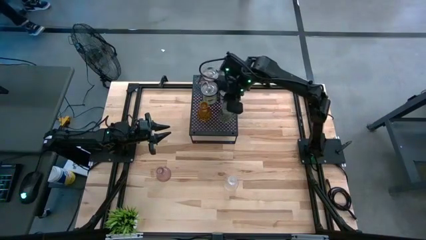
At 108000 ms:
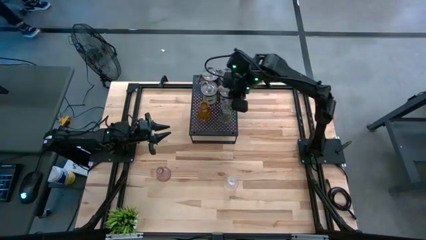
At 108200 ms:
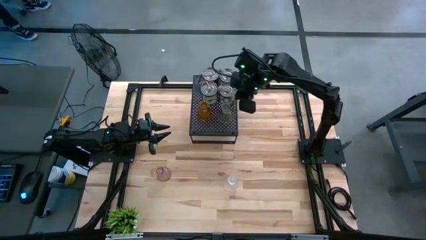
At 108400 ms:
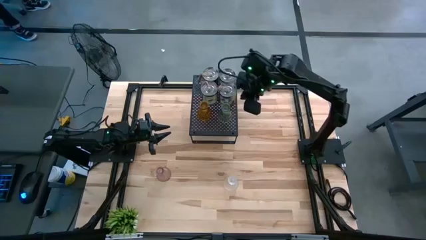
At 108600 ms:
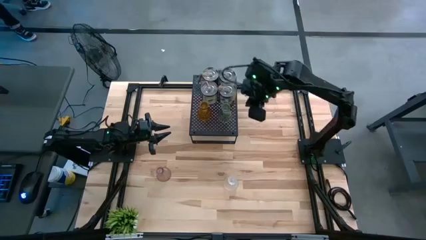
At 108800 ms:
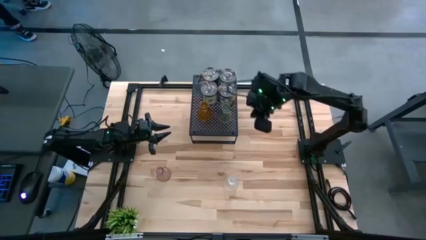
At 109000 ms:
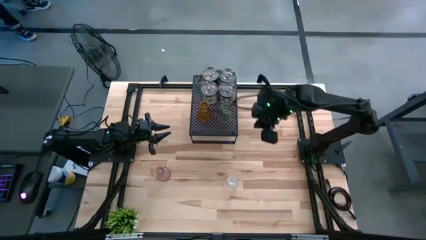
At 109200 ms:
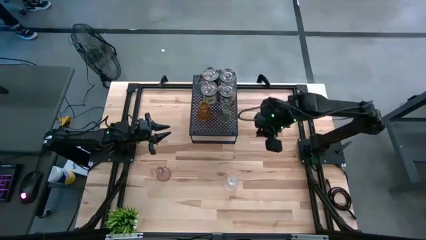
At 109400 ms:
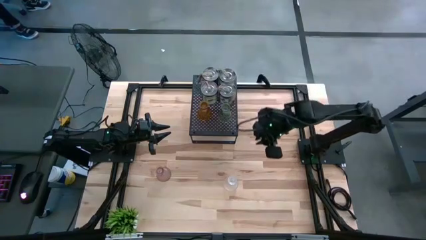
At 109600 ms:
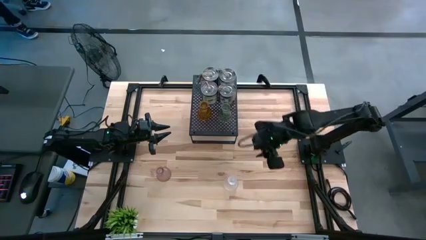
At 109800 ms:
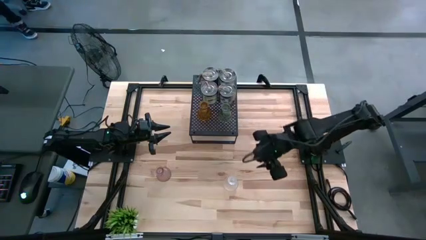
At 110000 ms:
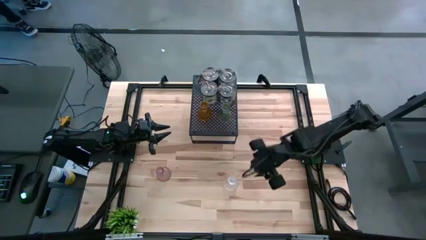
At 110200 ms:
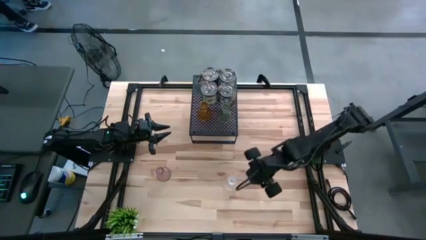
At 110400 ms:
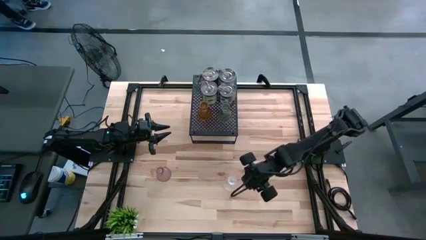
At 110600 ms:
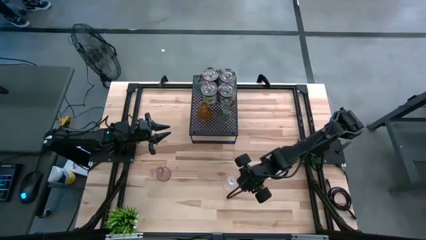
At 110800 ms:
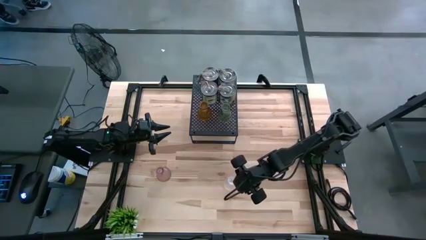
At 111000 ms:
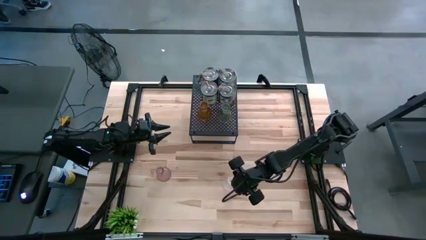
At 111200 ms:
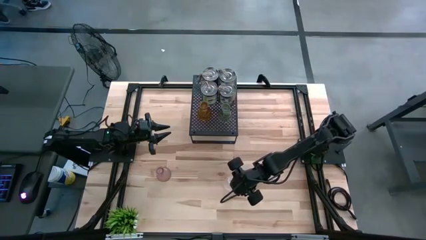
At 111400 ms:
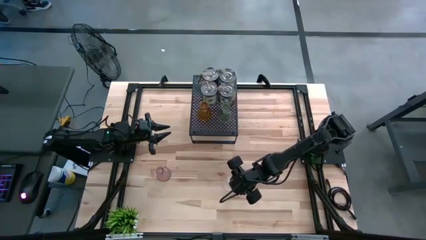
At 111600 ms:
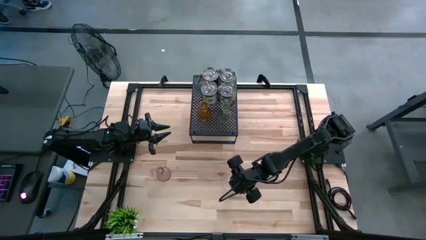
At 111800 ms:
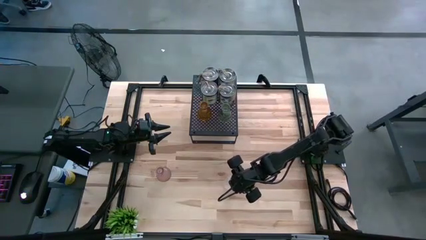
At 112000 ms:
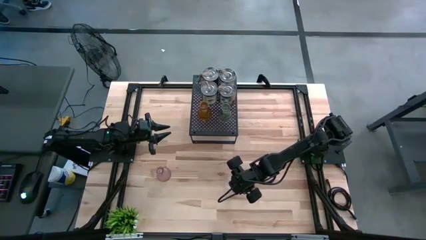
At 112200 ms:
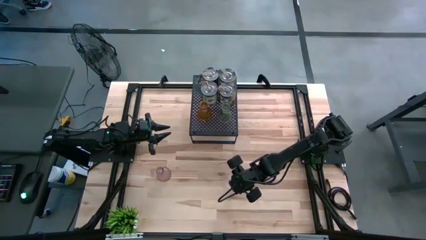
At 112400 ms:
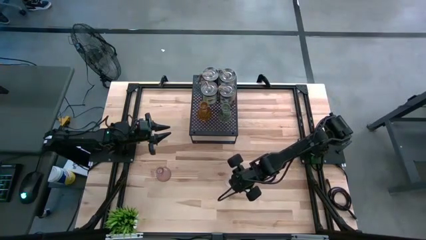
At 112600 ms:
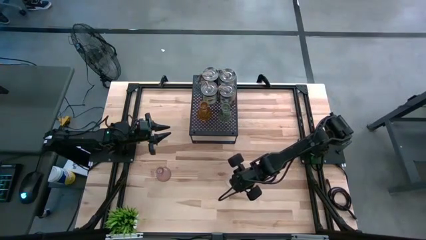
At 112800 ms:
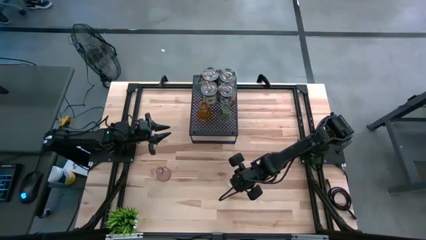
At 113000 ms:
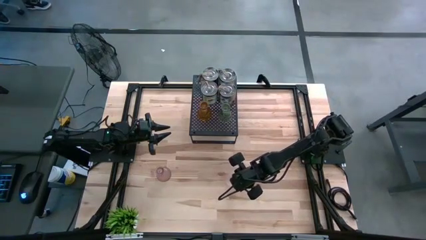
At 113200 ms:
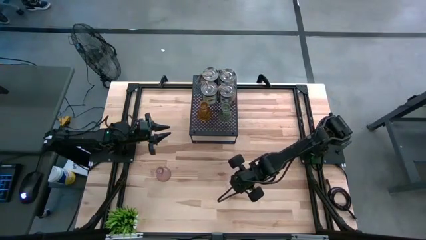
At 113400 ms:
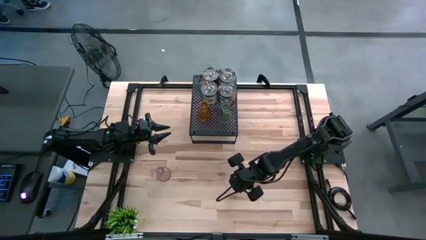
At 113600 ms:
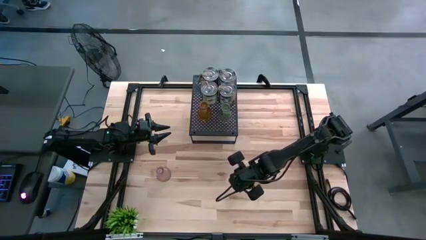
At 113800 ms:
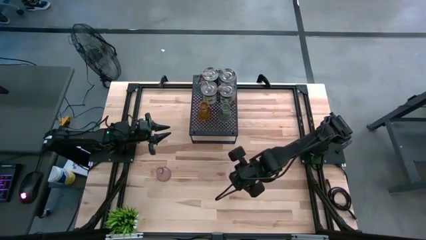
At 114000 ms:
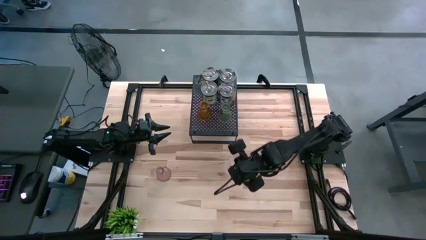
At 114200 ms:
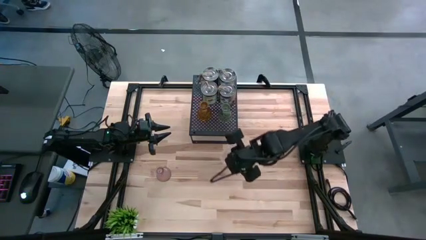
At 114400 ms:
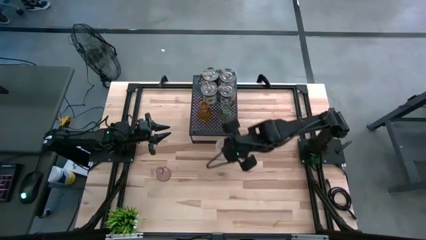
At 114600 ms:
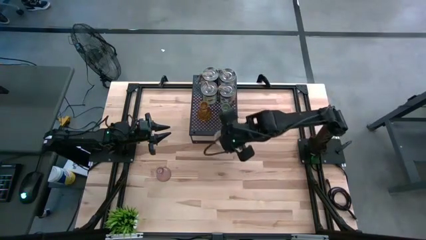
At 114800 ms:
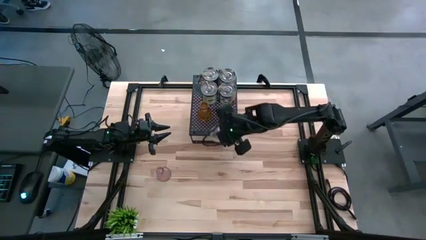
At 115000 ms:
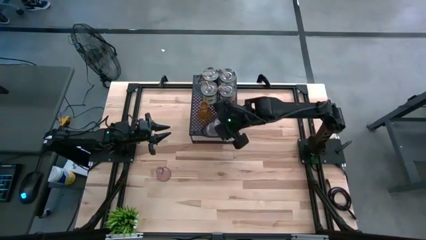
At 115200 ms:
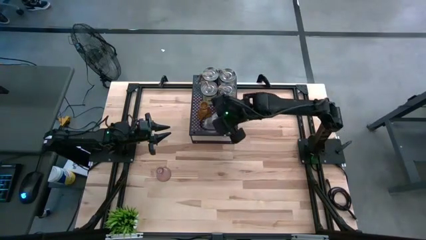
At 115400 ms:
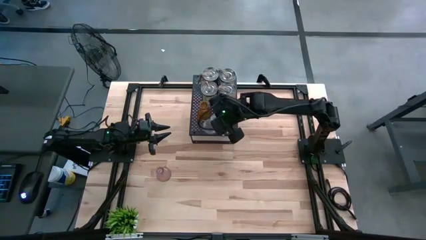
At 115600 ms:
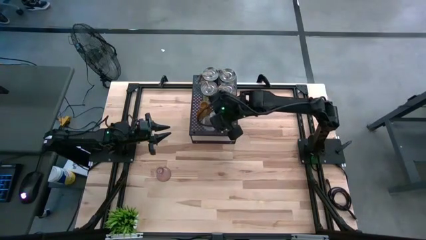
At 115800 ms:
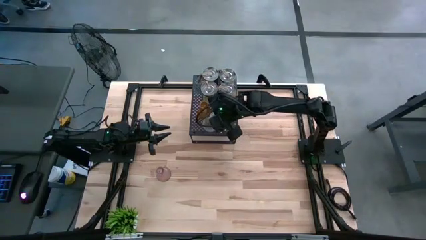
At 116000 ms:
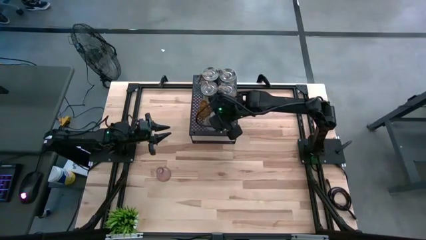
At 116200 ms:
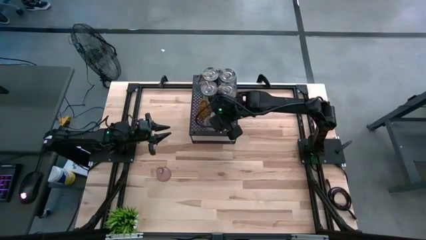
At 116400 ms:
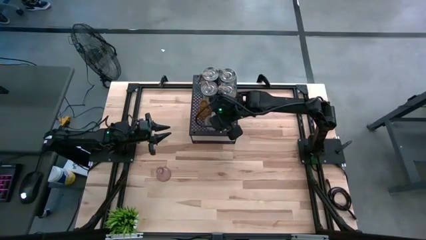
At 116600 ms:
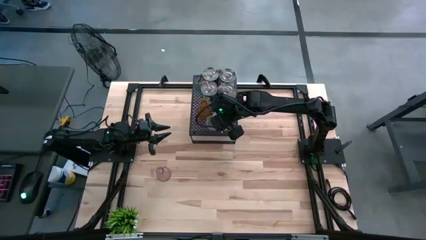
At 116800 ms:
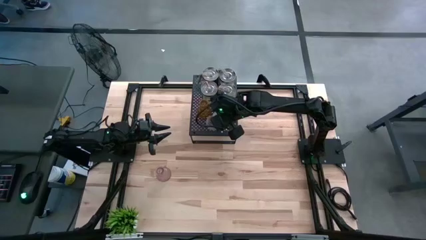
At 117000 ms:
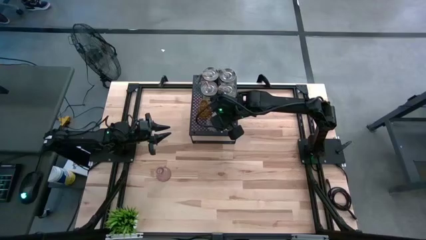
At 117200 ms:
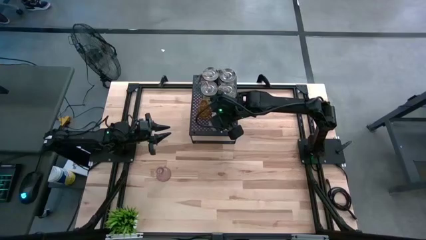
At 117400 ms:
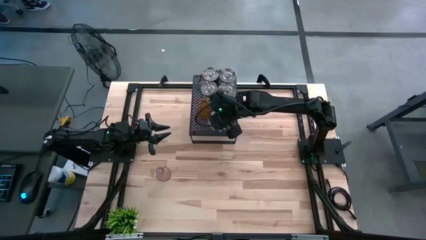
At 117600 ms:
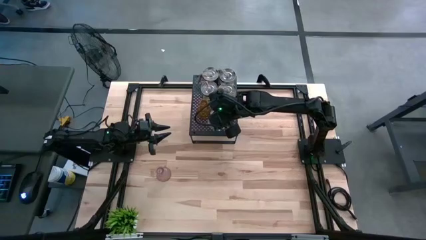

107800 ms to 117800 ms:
Task: Pick & Place candle stick holders
Put the transparent candle holder on the black shelf

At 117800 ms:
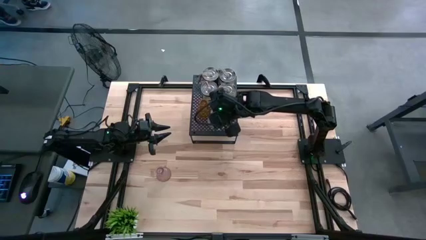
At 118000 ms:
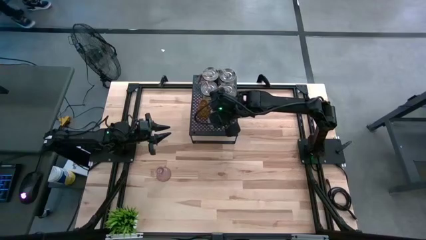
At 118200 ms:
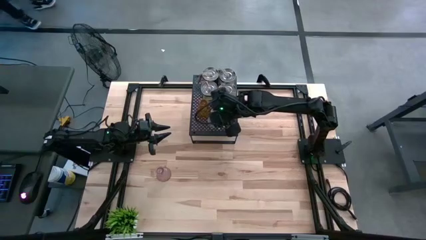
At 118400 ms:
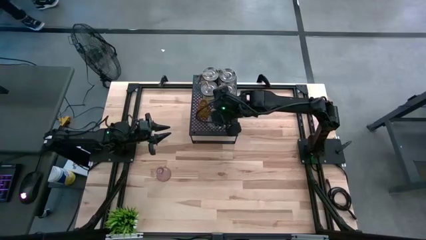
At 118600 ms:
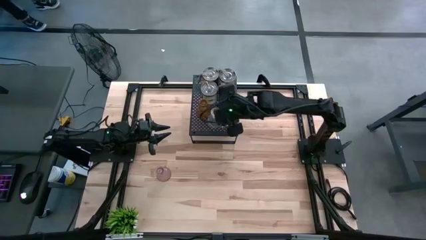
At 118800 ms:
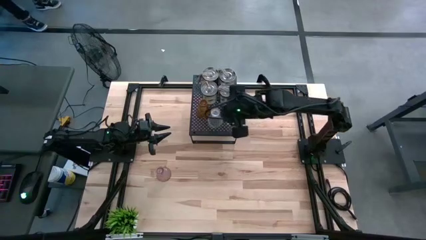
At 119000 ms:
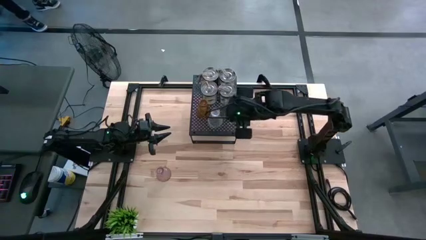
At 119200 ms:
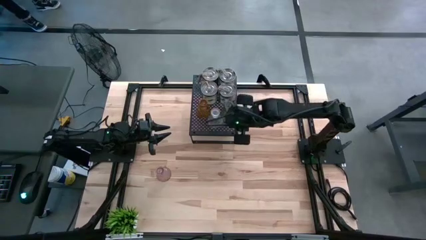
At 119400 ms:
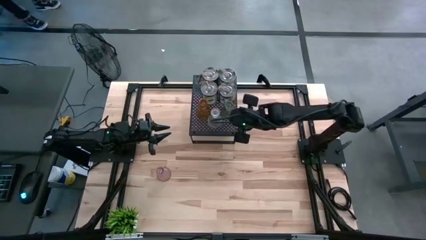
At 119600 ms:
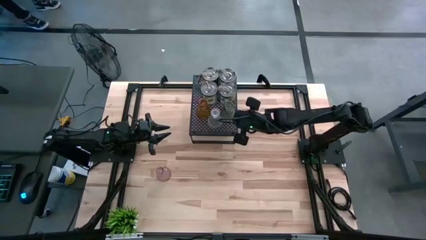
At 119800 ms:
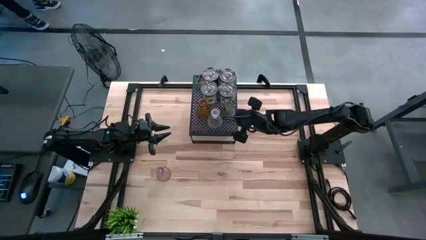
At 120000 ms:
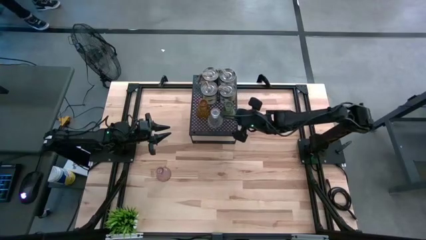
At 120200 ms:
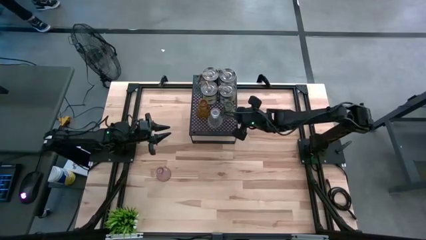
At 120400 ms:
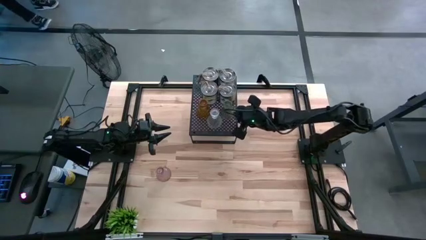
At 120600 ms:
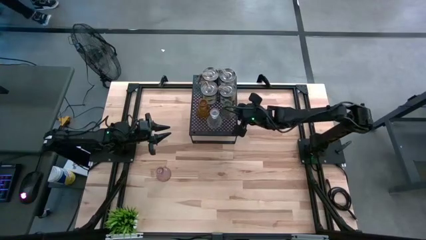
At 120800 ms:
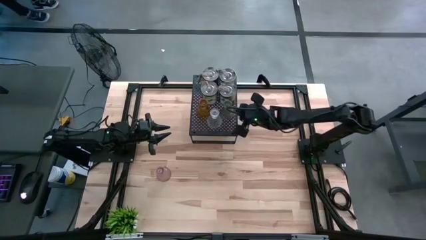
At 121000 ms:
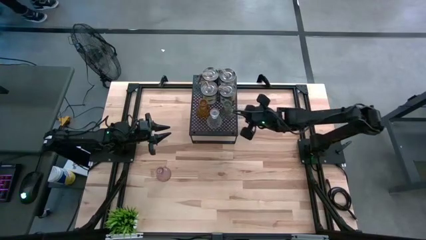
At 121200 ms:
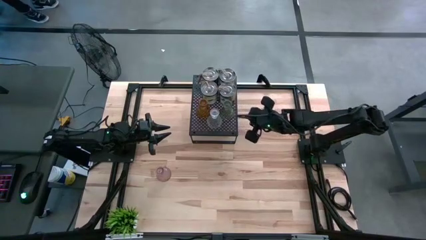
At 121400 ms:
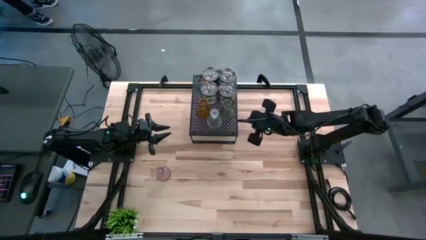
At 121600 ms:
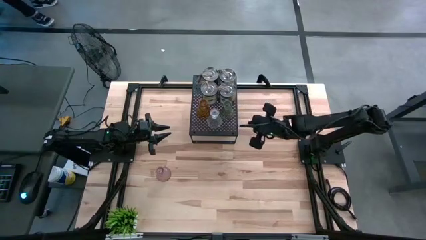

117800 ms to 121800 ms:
Adjust the green candle holder on the black shelf

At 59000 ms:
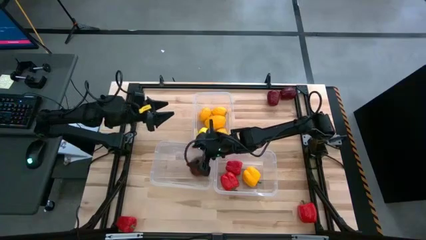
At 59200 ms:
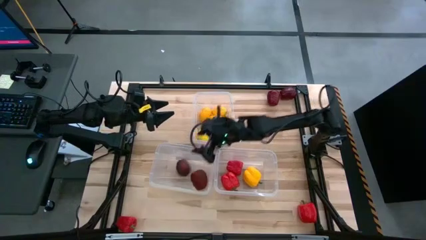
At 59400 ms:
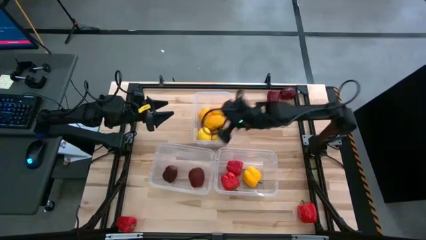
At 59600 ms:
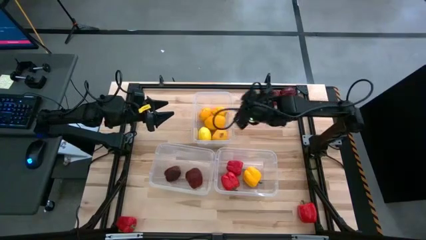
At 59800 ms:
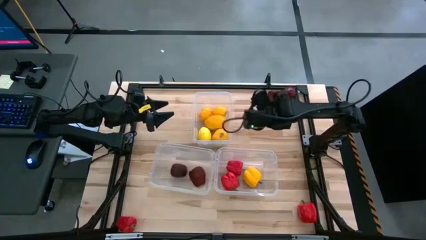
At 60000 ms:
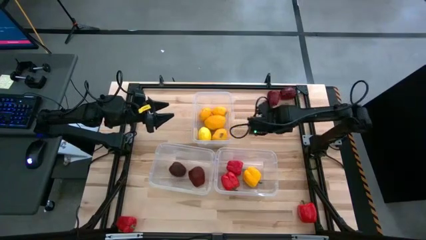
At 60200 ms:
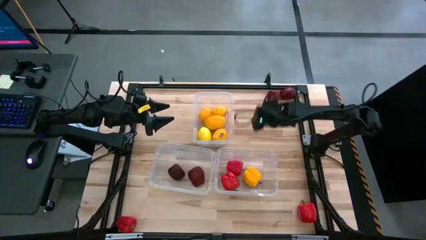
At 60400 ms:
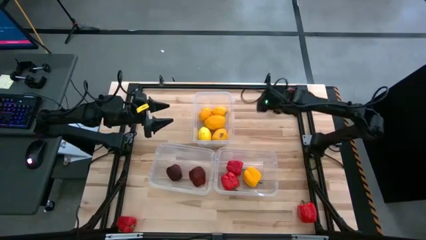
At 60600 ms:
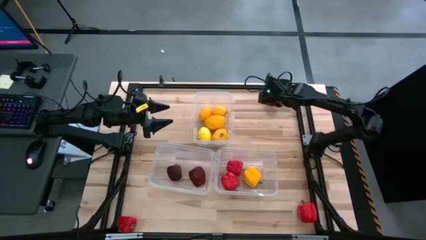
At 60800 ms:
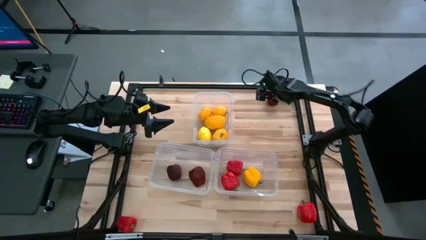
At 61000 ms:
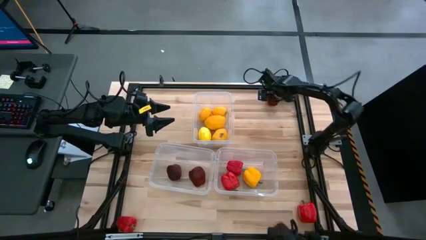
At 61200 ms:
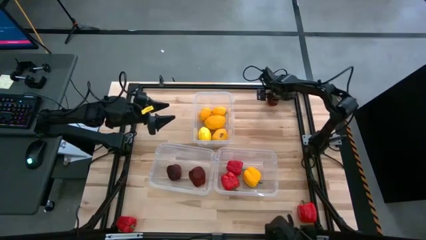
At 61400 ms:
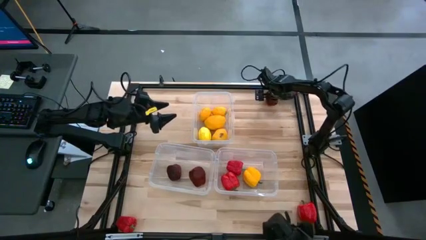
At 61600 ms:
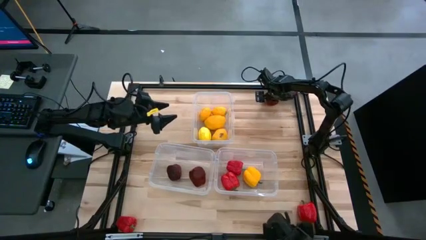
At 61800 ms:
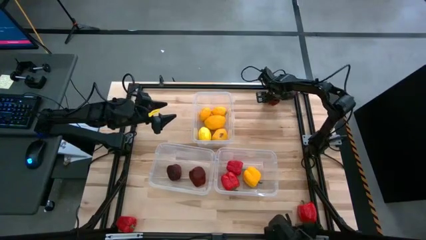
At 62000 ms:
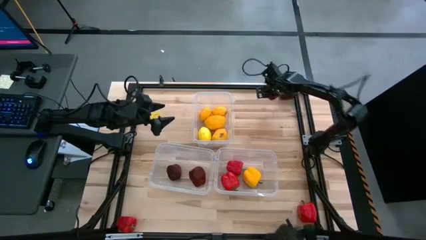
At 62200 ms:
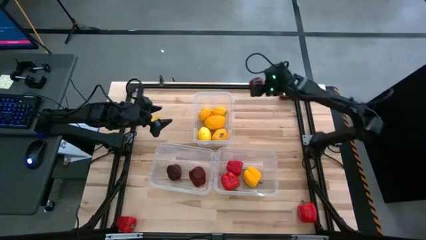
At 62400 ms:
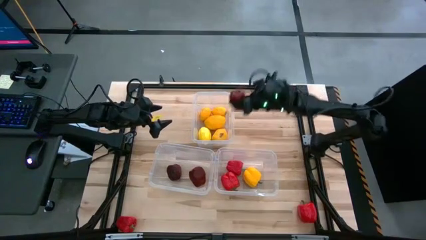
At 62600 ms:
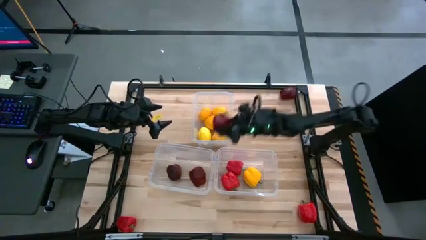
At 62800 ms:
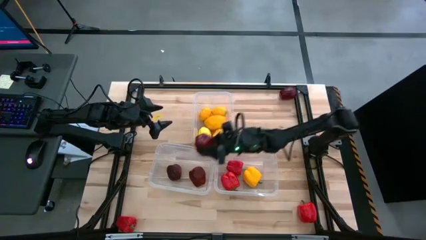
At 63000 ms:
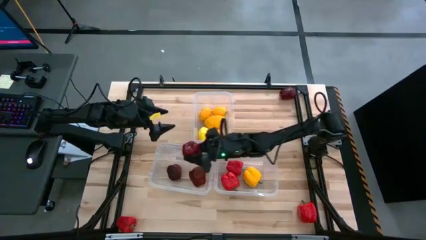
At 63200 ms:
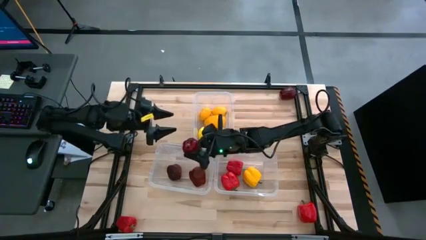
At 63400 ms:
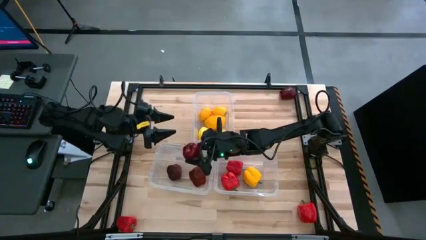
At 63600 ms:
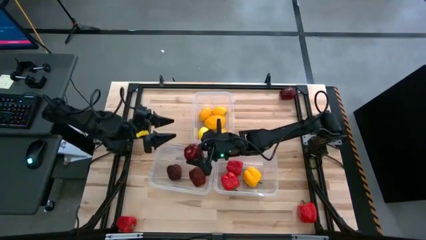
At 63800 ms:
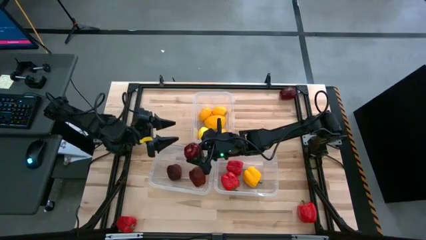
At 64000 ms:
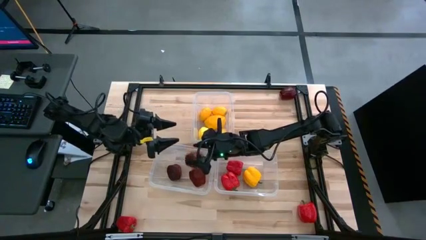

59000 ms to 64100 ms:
Task: Sort produce into baskets
Put the red apple into the bottom left transparent bin
